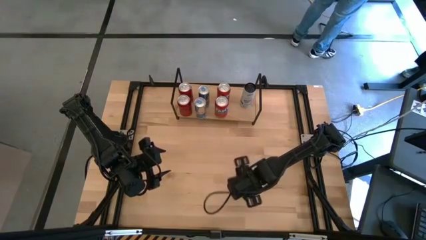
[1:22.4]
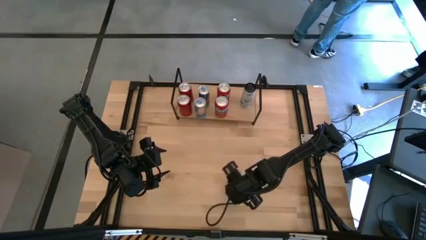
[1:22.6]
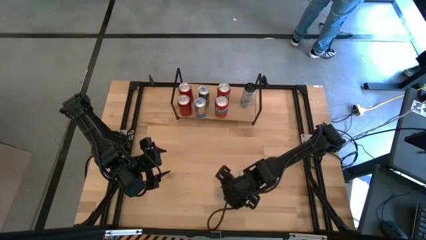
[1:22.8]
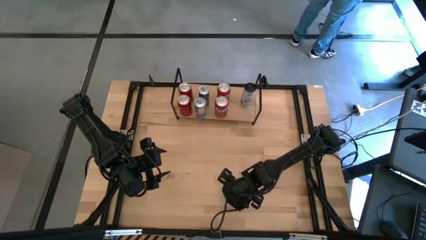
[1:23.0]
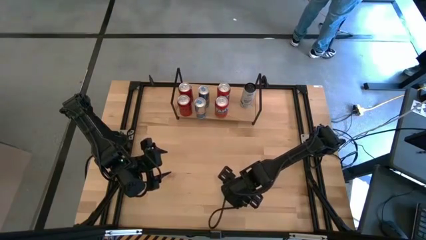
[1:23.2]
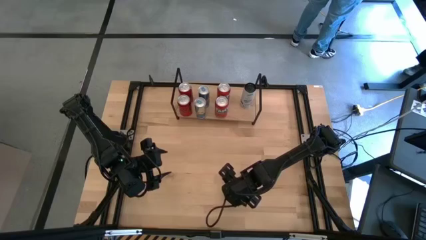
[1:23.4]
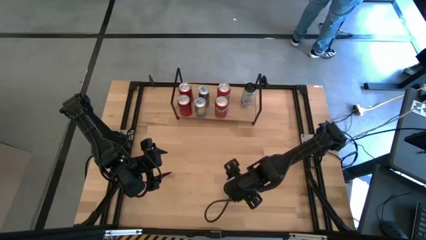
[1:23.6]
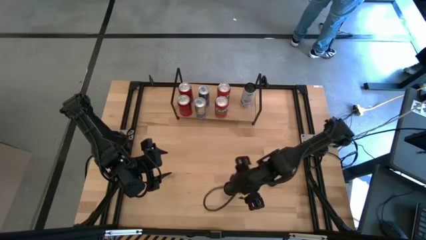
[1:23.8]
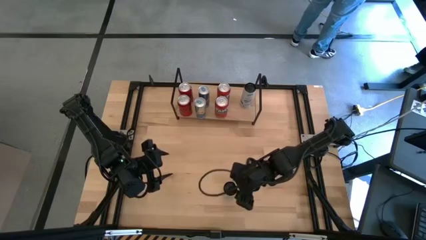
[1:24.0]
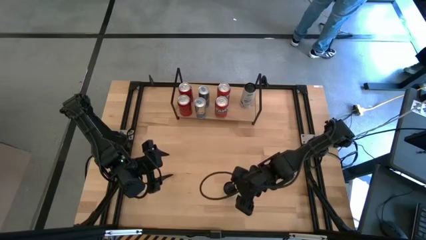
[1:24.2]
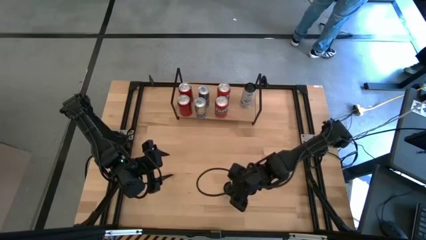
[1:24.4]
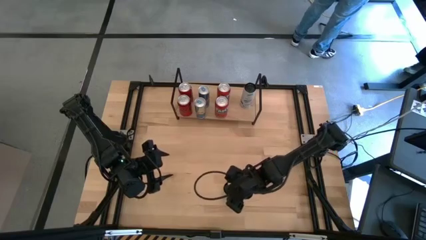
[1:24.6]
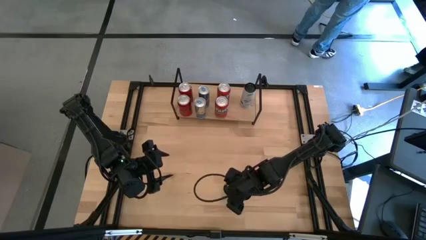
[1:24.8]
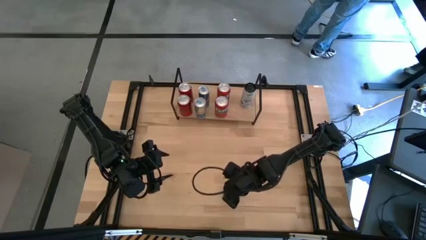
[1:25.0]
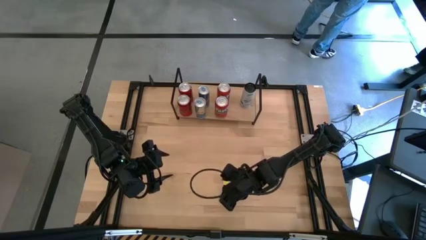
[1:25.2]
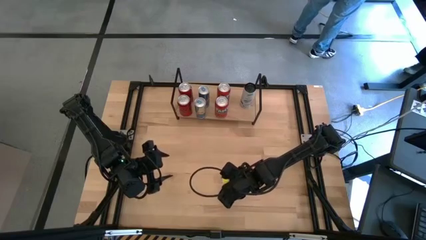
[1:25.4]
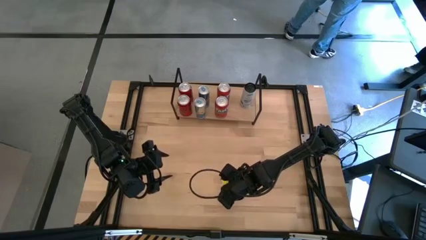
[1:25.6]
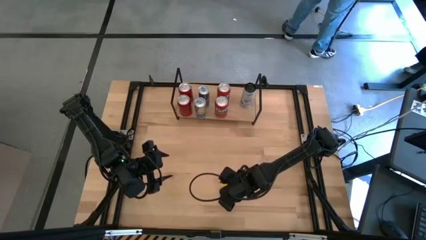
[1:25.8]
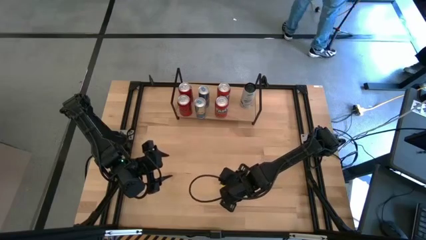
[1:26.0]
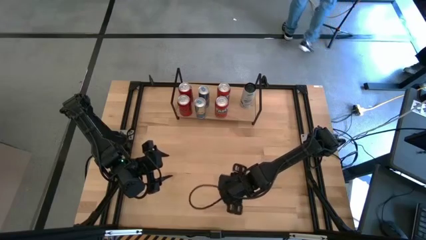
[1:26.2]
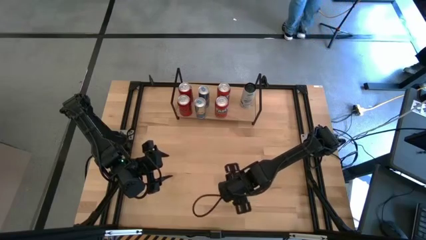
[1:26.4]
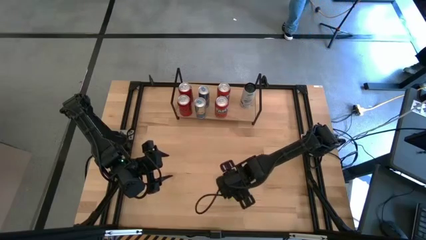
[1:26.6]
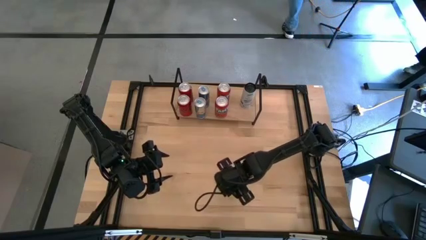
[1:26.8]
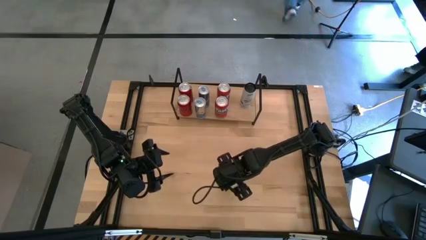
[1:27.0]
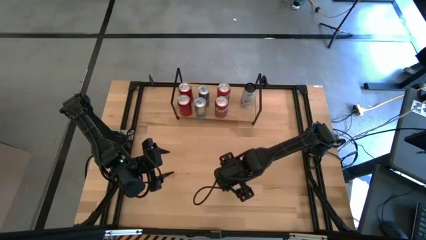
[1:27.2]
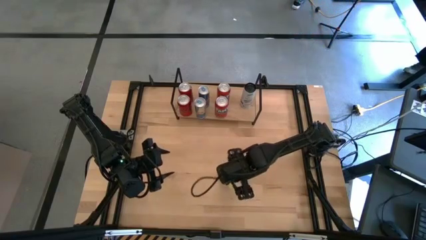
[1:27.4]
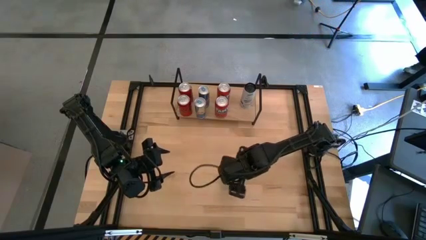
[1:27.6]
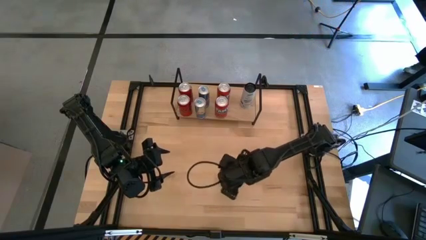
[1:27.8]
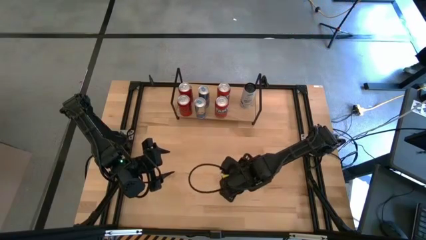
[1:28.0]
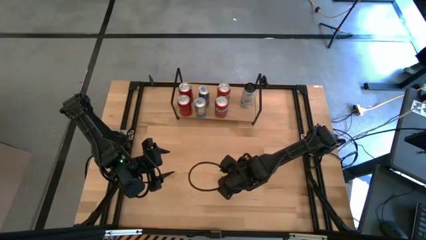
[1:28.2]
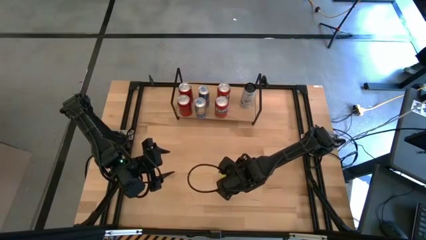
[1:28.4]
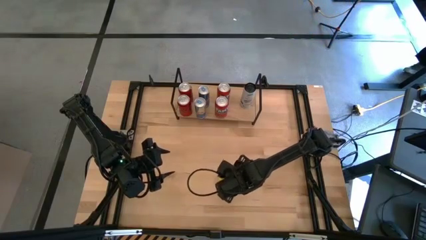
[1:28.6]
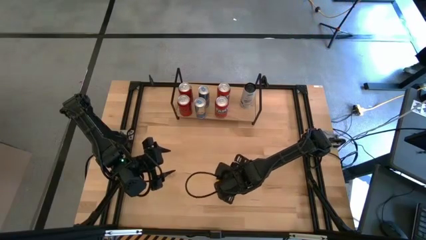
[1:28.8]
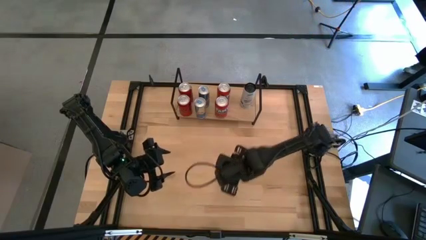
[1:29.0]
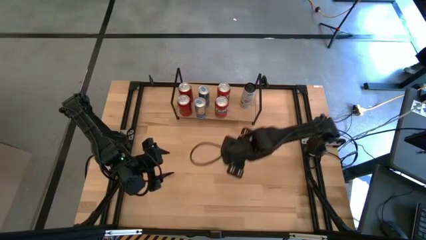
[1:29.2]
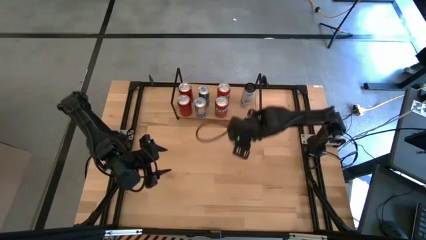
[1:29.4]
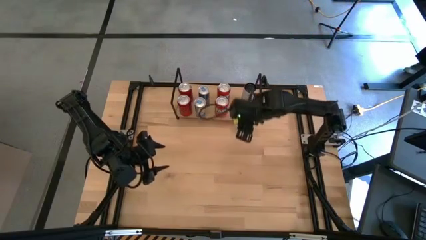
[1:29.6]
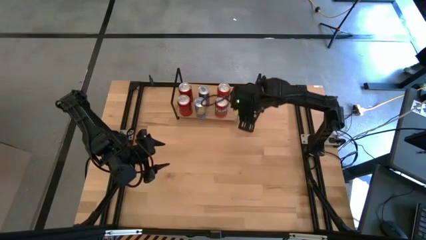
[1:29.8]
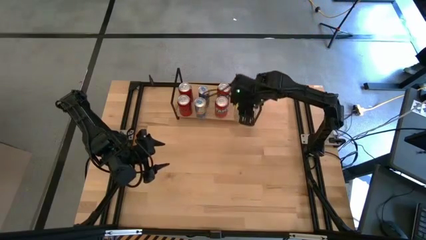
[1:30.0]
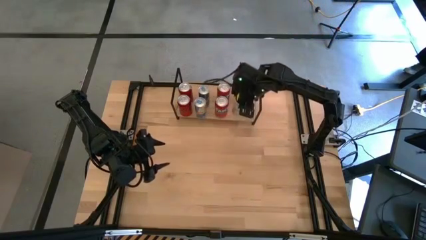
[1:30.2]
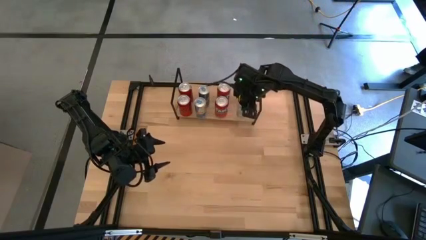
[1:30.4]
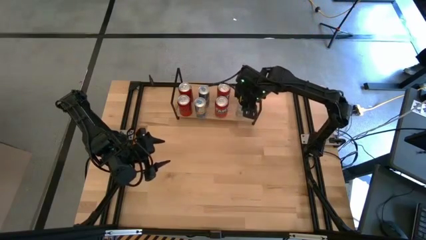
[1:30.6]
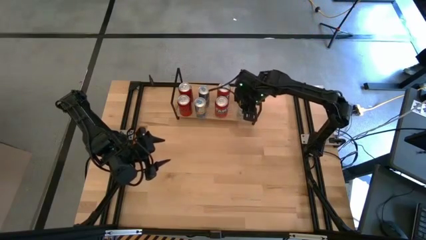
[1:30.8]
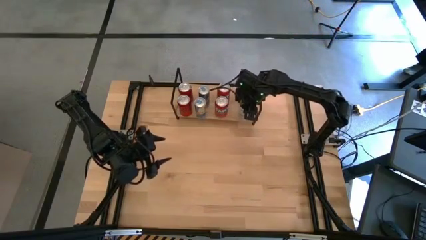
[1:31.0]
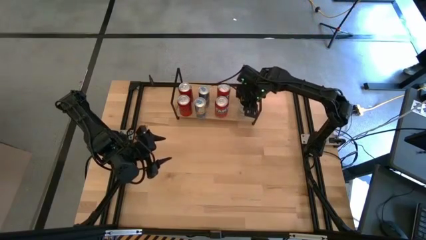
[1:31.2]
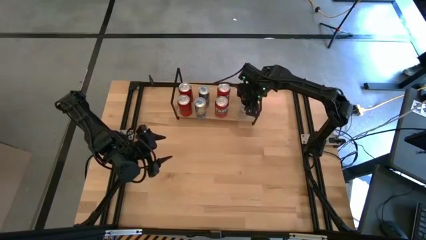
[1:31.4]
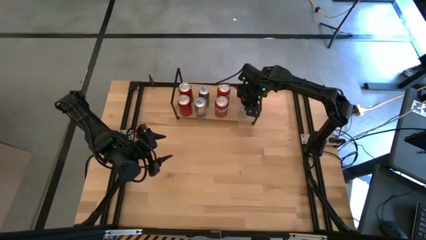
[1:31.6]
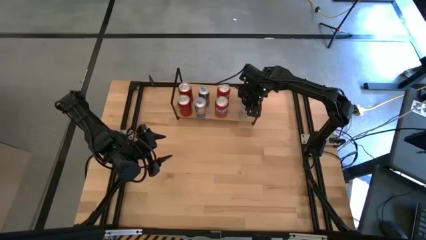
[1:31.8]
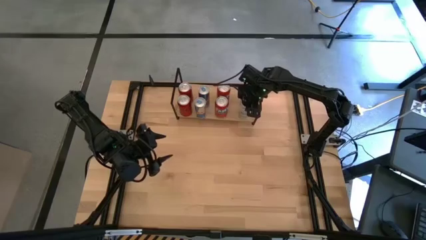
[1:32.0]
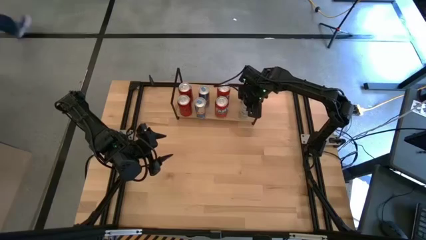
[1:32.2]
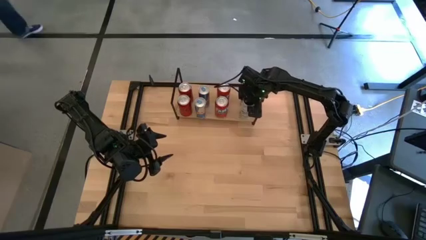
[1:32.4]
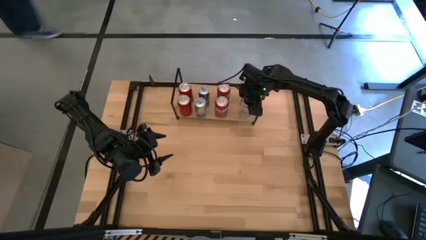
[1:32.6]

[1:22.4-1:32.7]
Task: Place canned beverage on shelf
Put the blue white soda can on the shelf aligned with the other blue white soda can

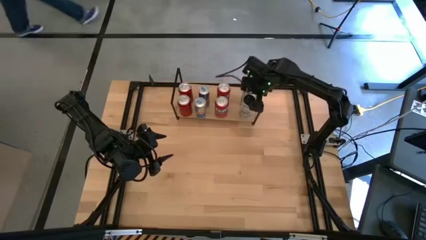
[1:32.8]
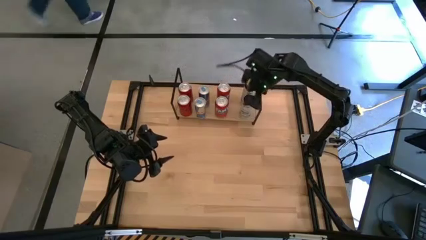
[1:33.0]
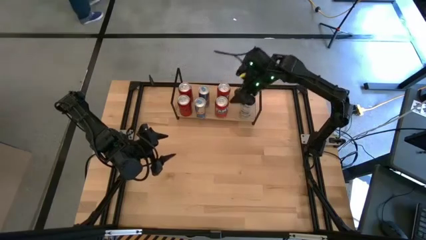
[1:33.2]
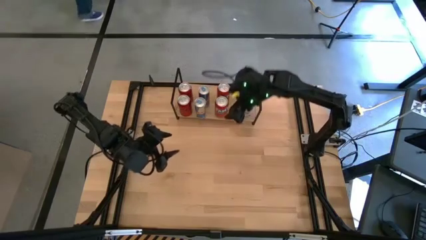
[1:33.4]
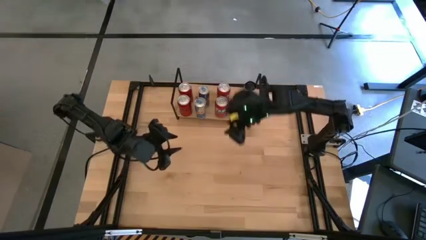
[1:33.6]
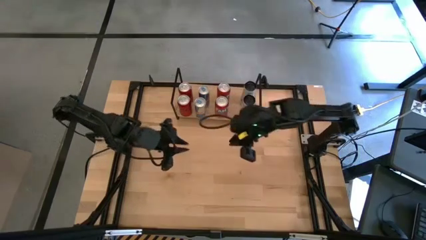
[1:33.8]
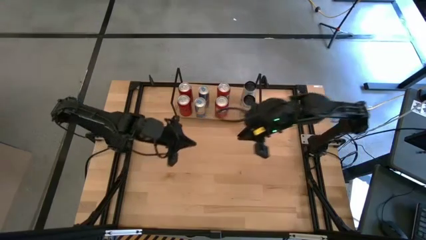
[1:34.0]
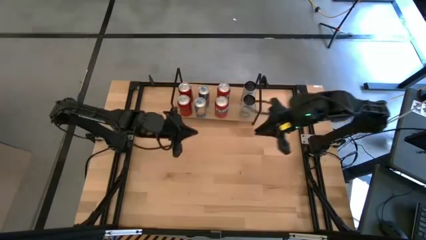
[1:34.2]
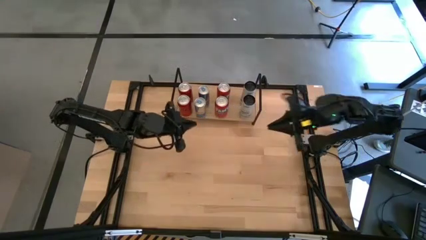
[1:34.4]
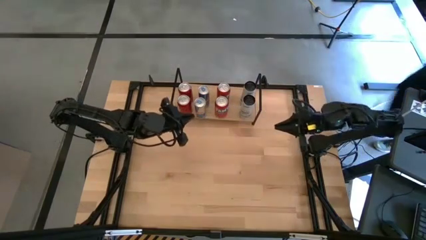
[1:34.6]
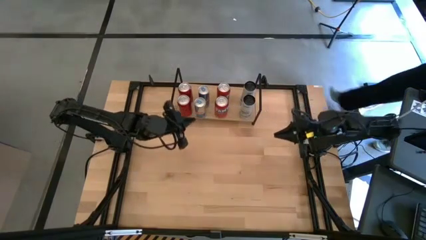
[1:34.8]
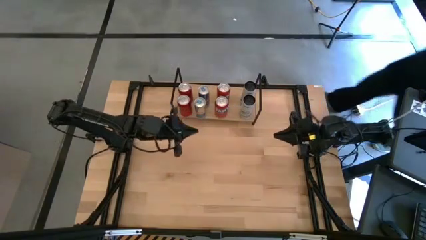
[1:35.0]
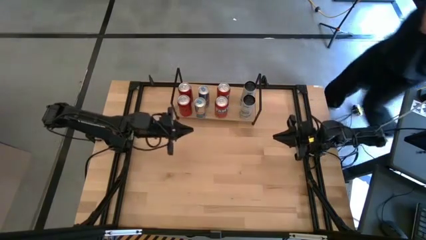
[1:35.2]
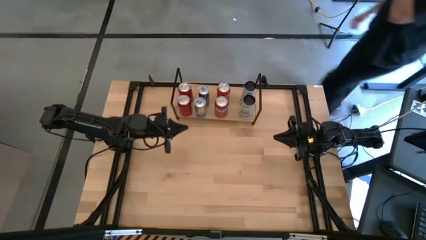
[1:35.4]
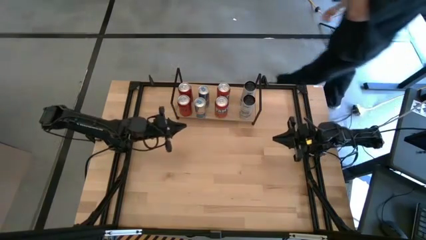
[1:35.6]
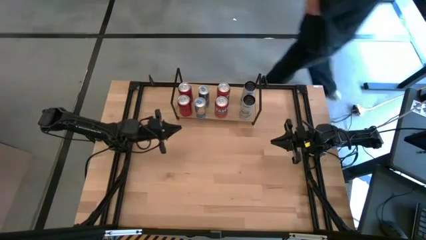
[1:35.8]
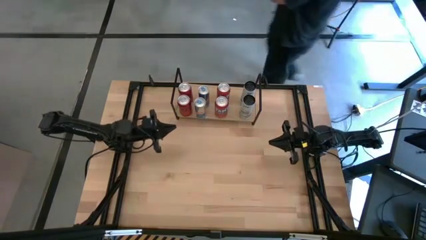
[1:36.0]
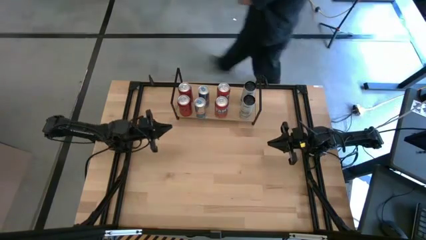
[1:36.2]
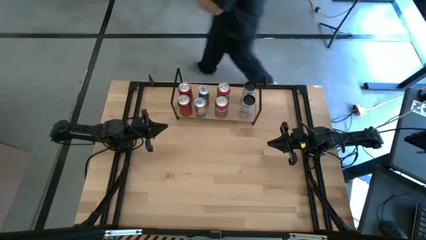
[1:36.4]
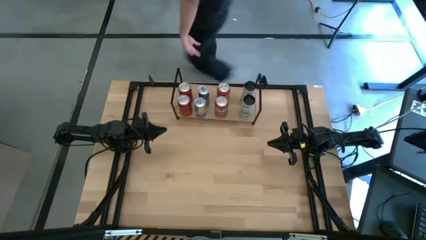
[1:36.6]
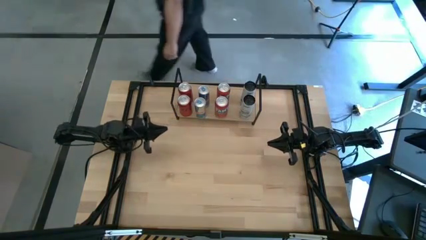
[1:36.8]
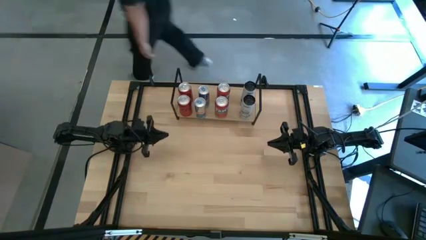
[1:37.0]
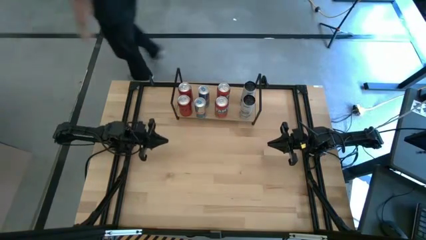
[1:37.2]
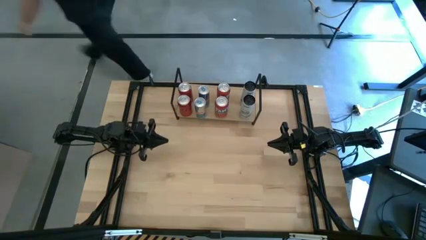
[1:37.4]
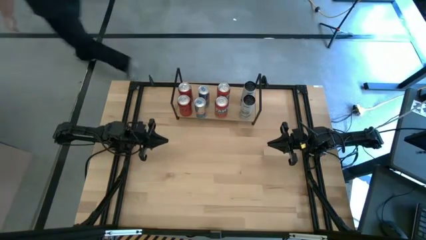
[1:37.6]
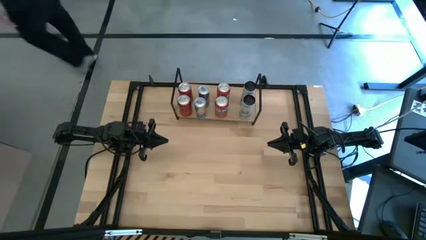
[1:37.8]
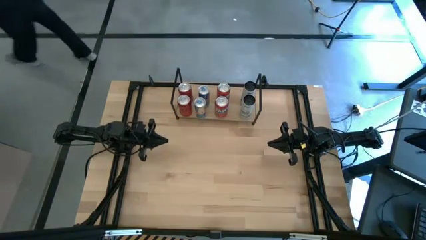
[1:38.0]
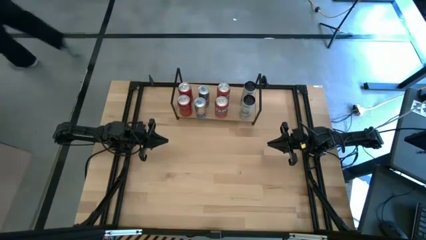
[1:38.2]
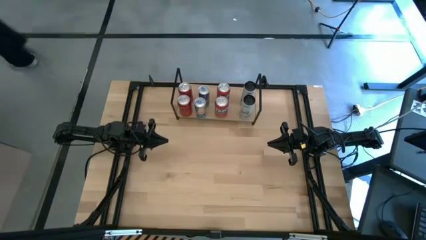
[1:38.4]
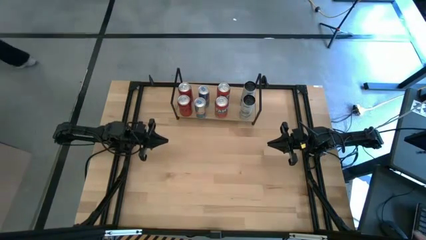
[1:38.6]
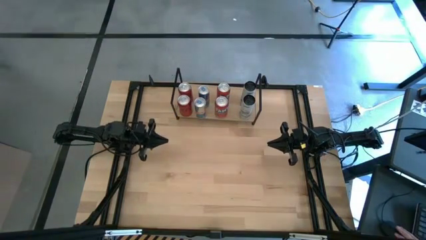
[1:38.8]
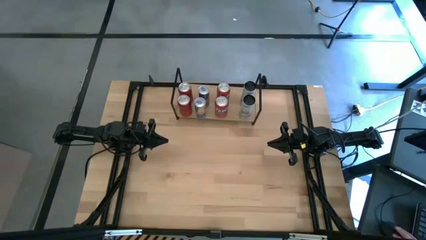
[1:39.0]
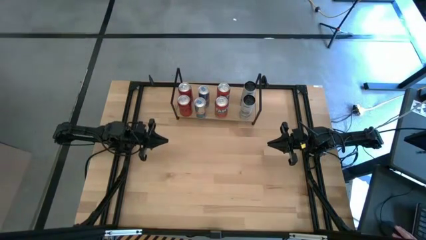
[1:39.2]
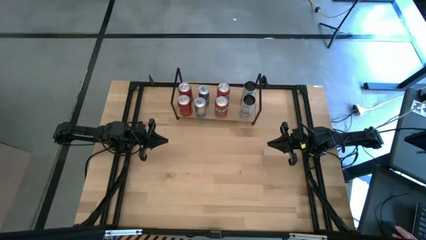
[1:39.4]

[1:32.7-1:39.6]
Return to Home Position
